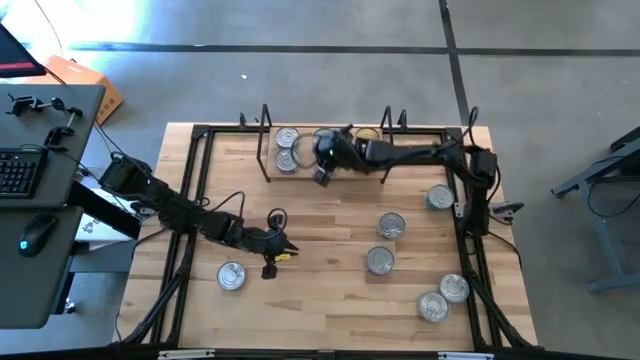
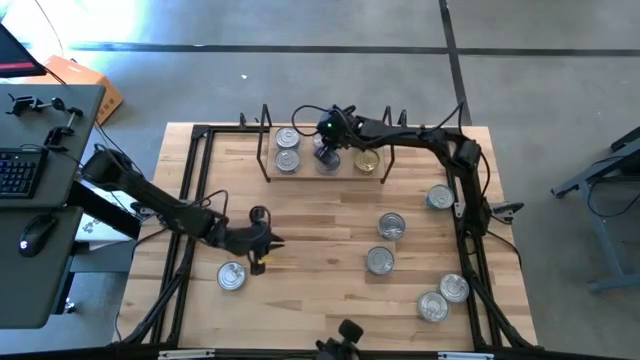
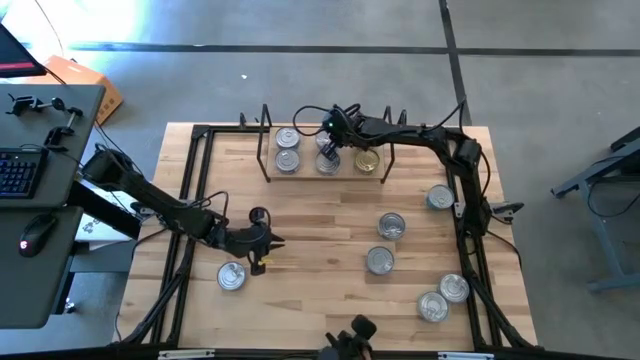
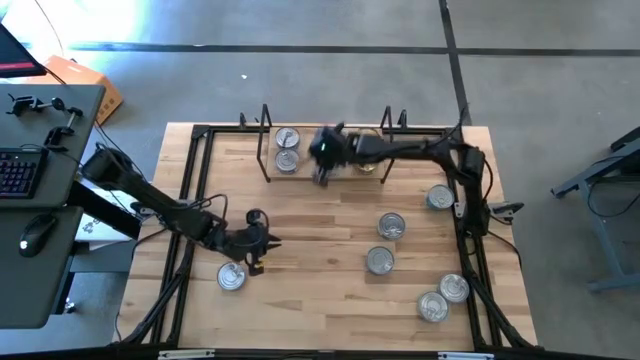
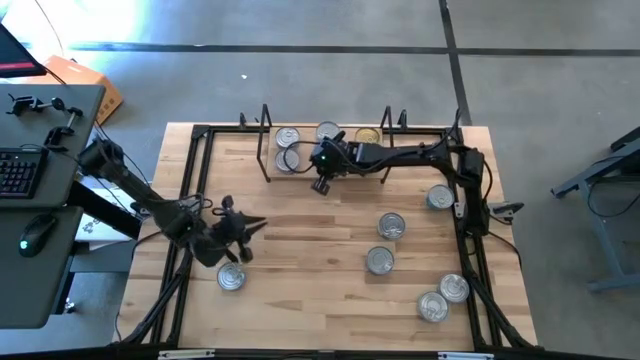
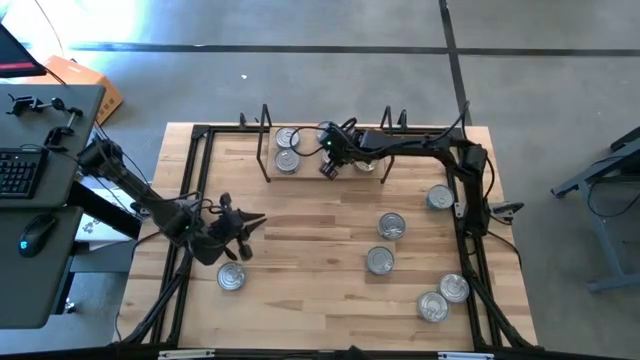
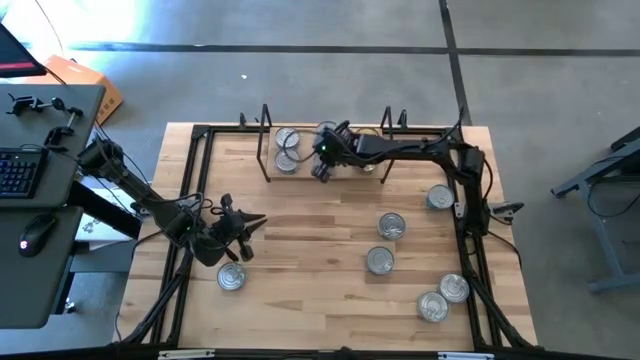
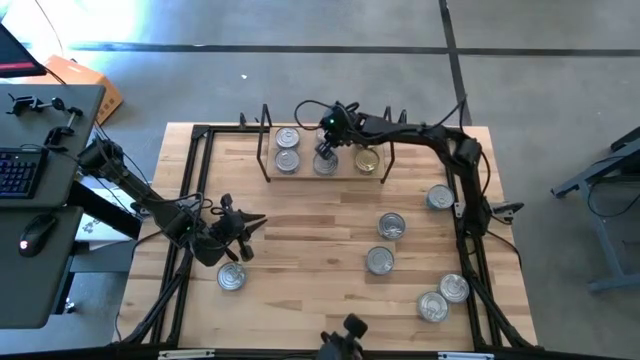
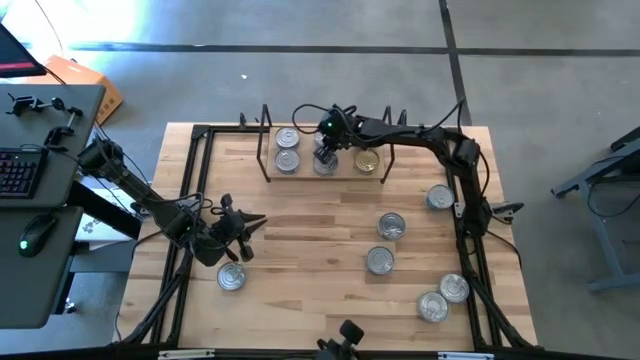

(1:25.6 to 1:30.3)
Task: Stack canned seafood by type on shelf
Adjust the yellow-blue tuna cans on the table

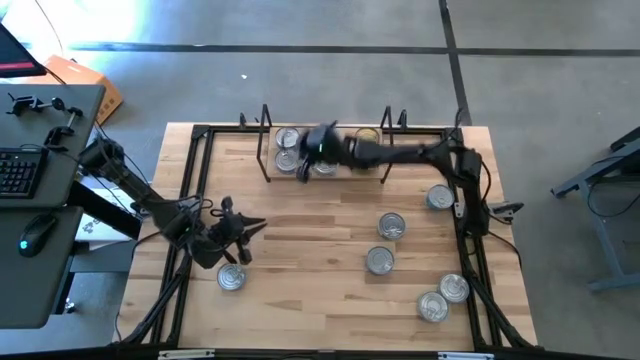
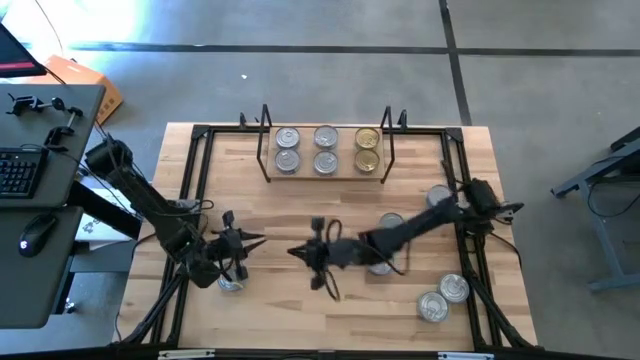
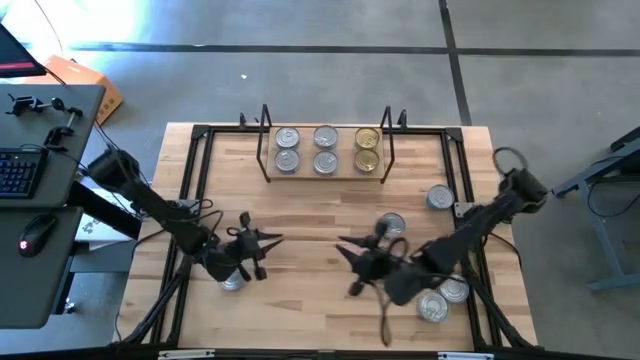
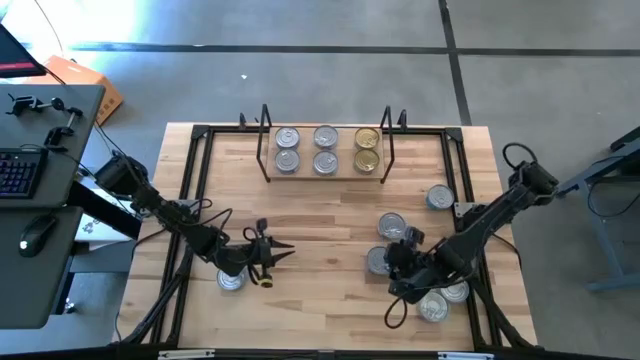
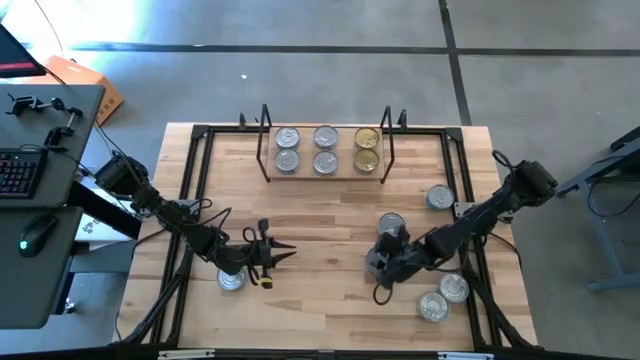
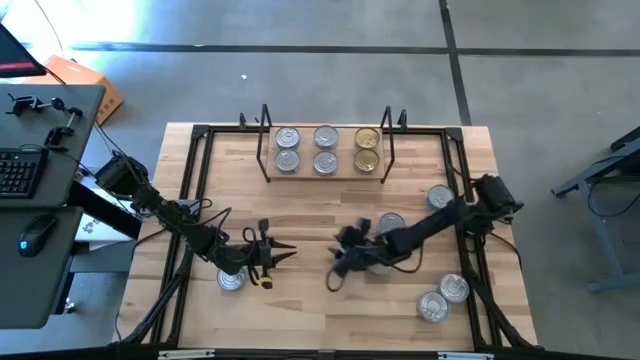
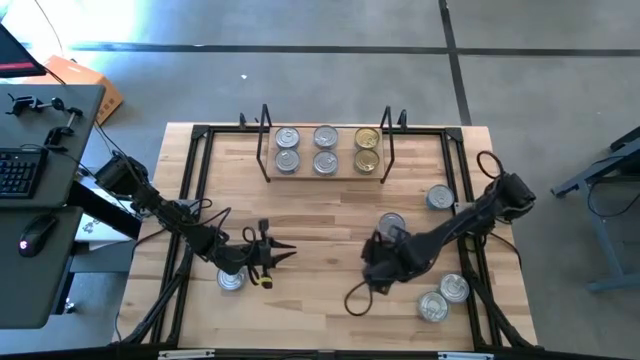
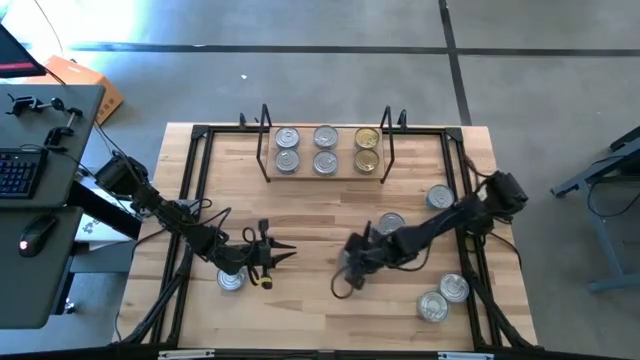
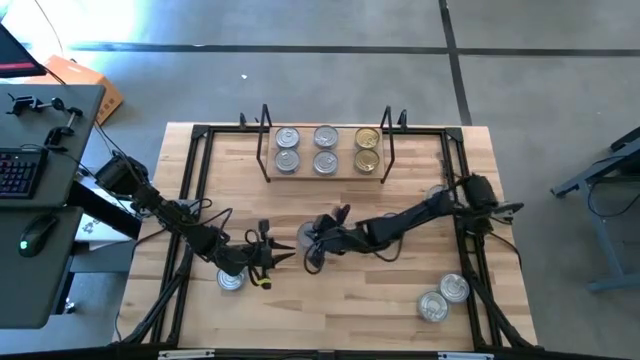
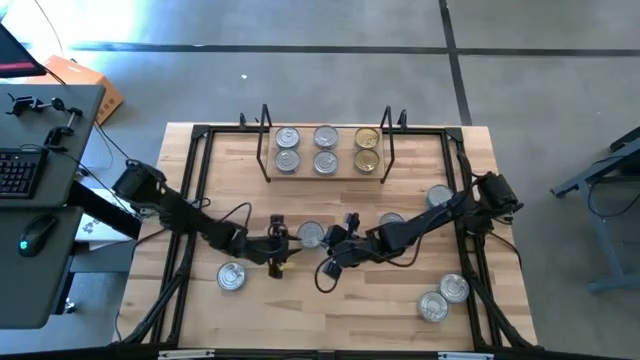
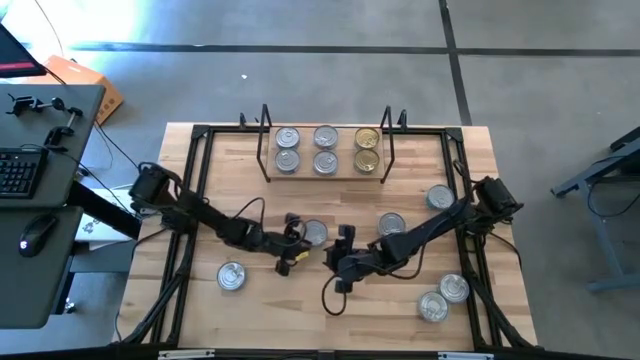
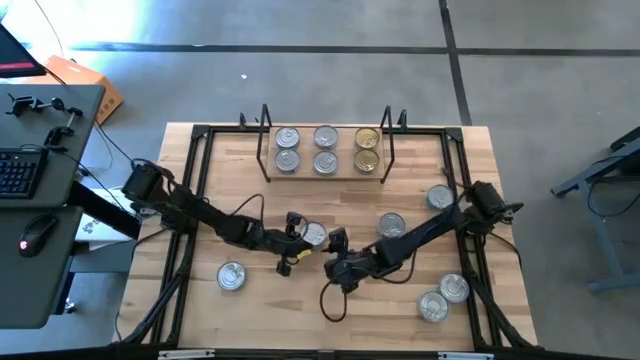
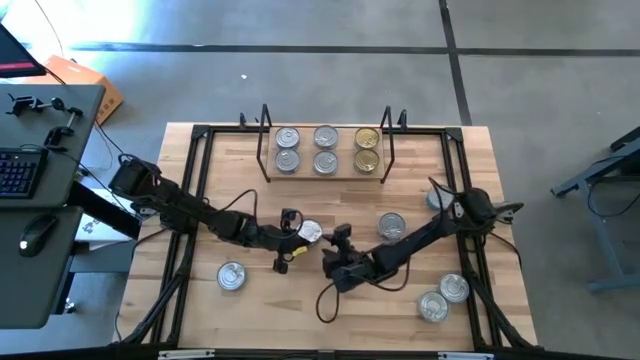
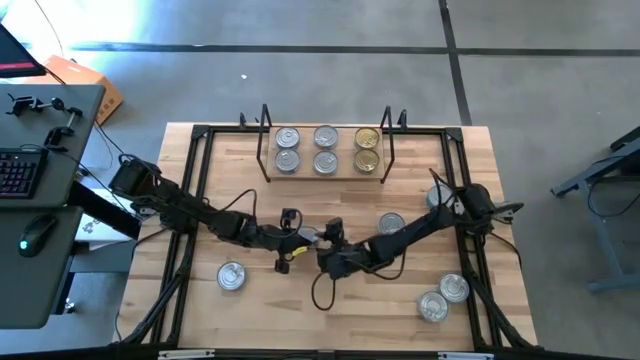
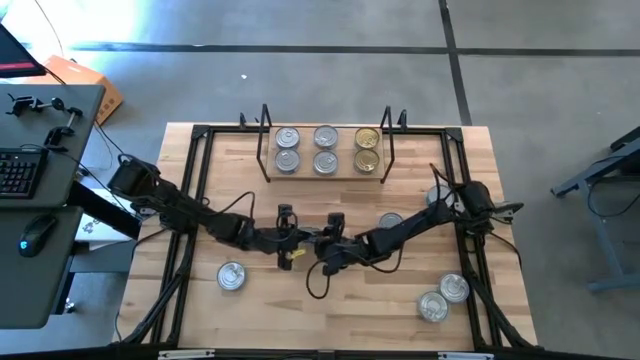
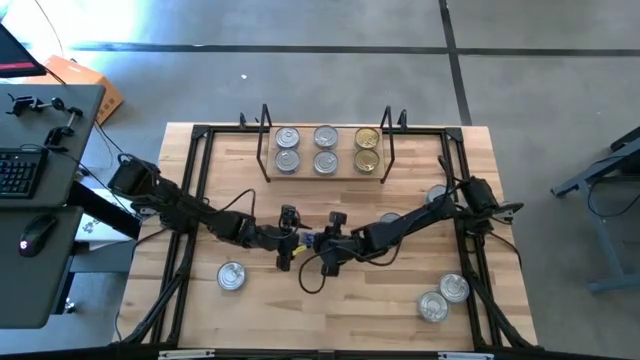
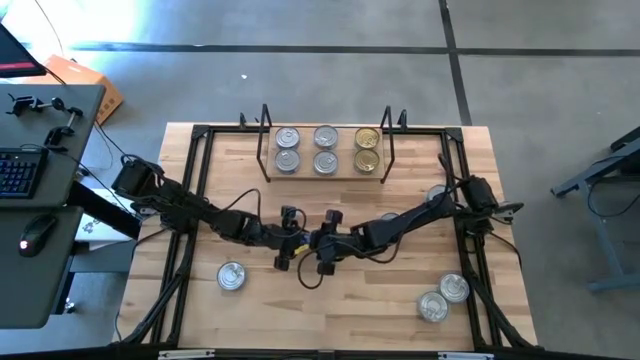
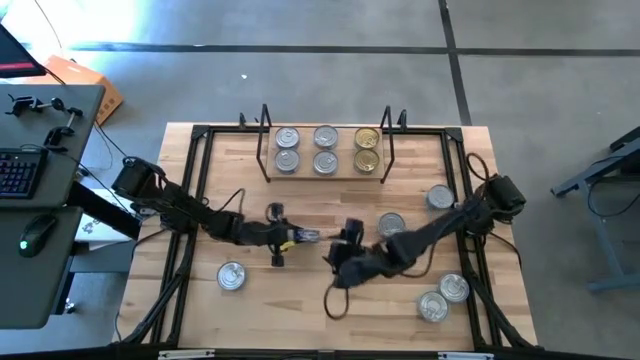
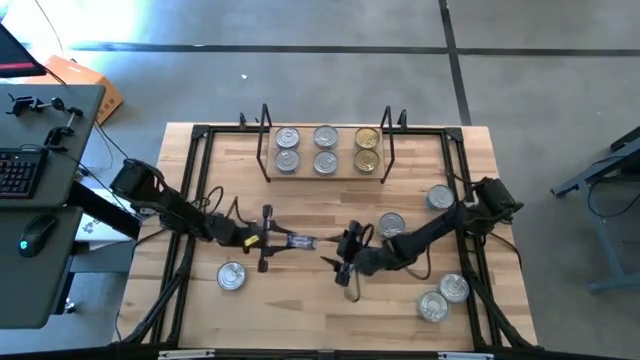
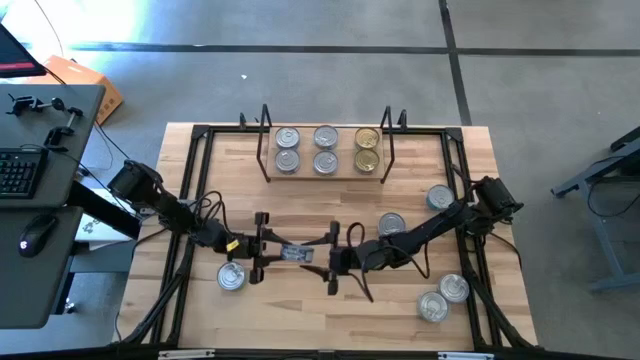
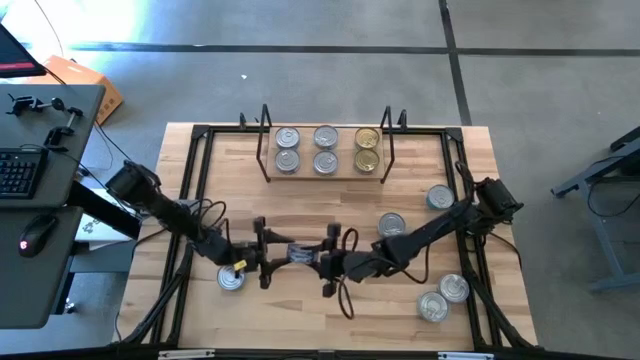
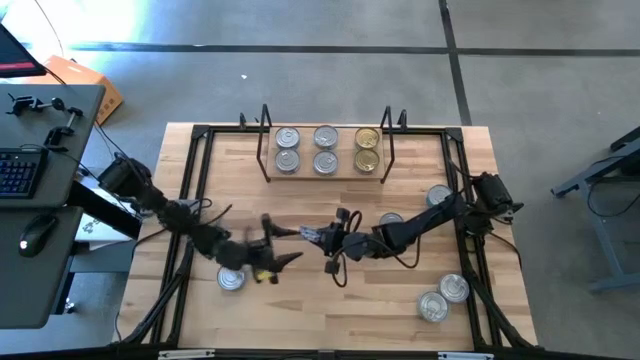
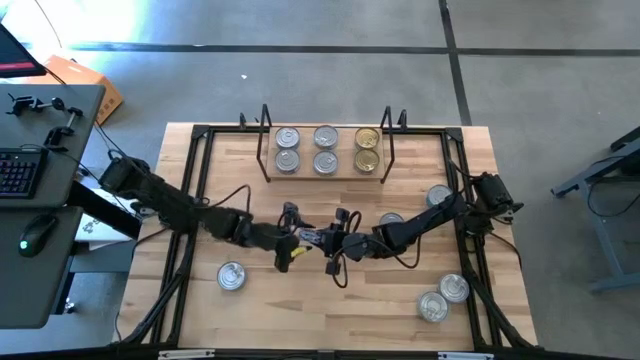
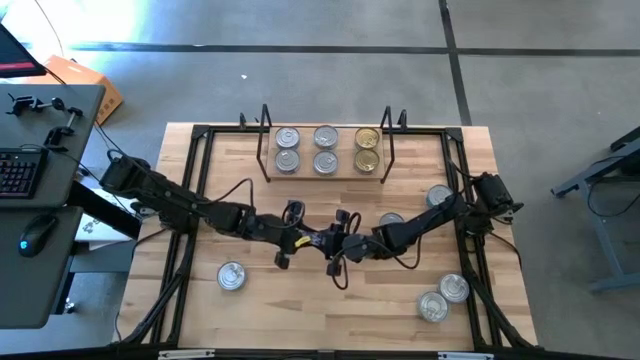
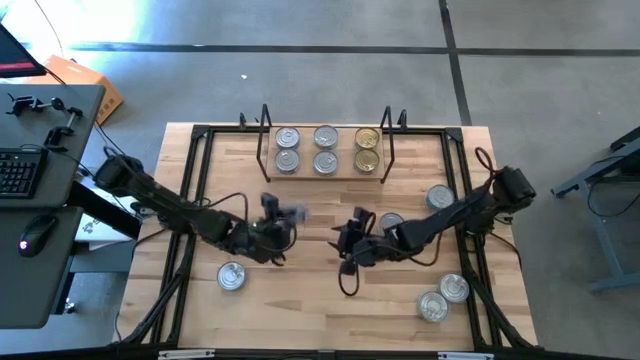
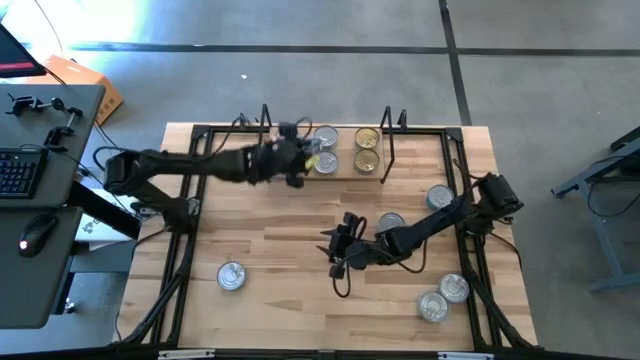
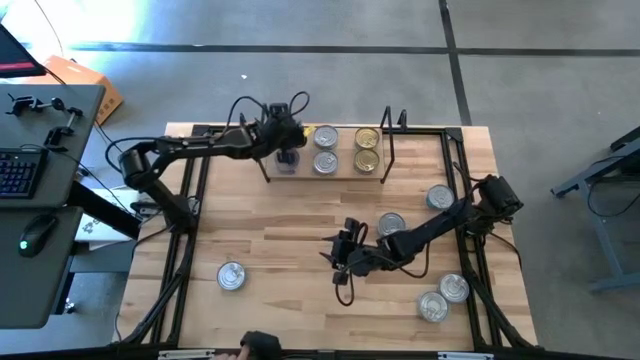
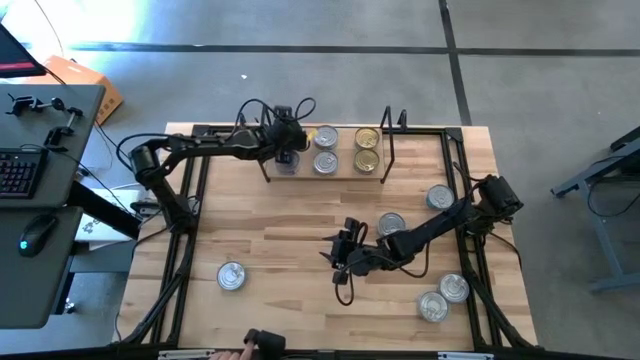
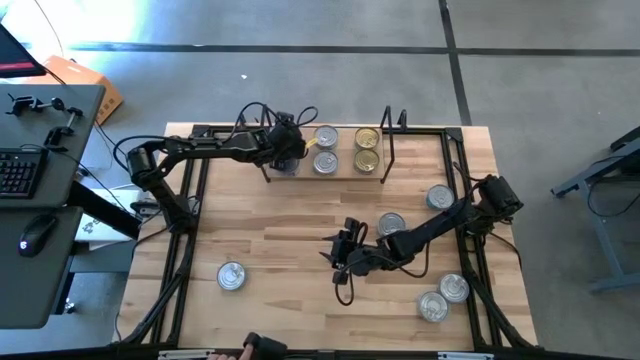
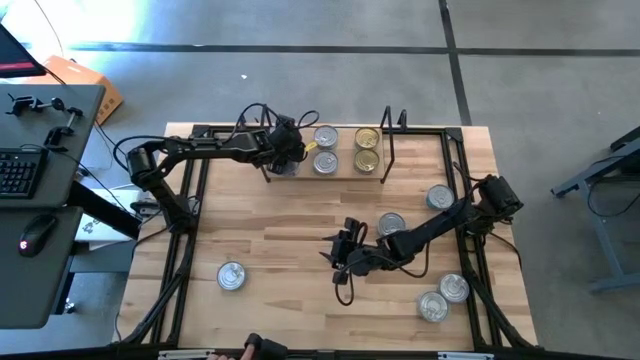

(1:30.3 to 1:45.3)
Stack the blue tuna can on top of the other blue tuna can on the shelf

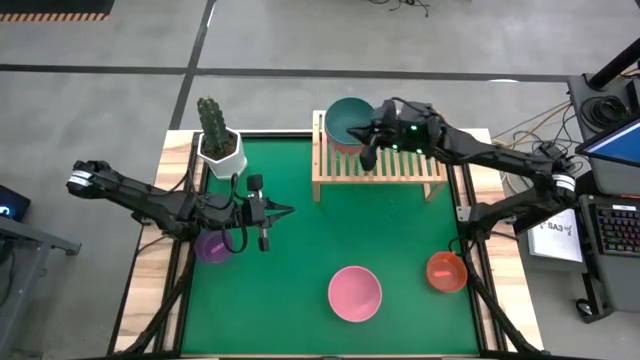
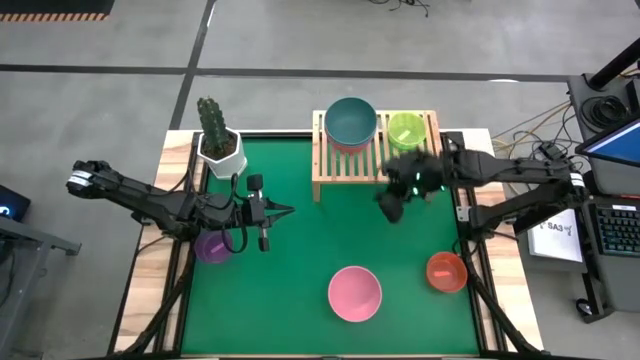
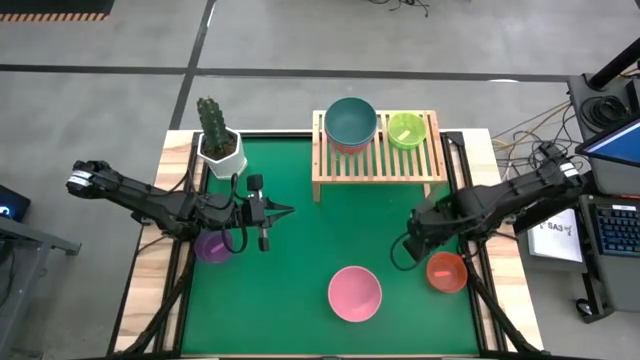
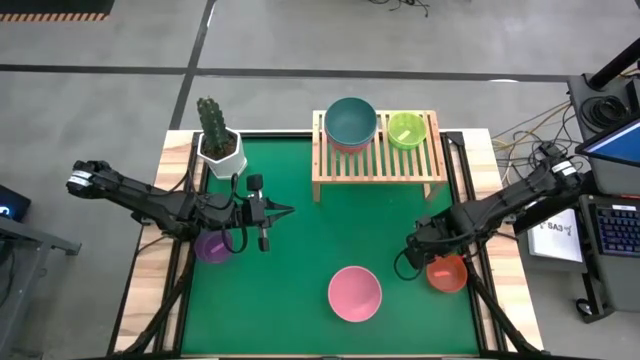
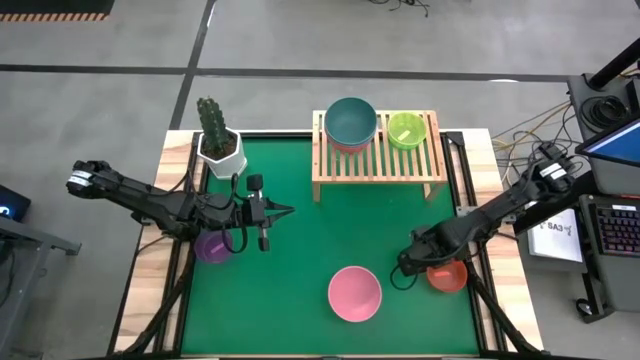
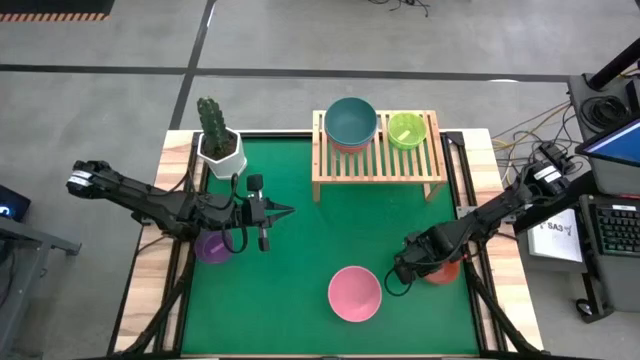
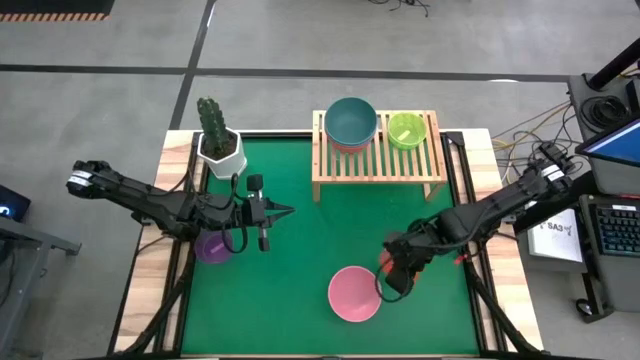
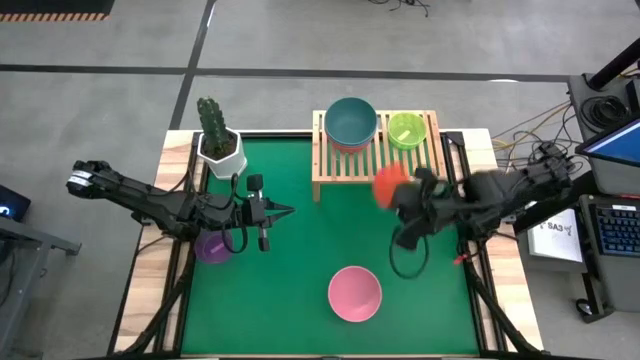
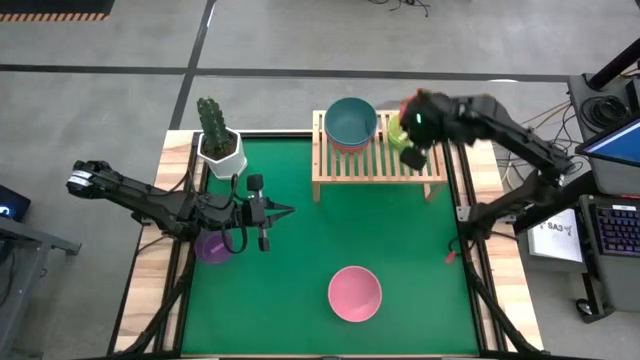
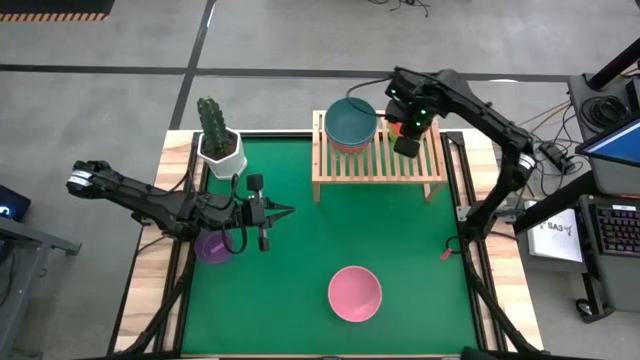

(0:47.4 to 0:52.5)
Task: Place and stack bowls onto a shelf
Stack the orange bowl on top of the yellow bowl on the shelf
